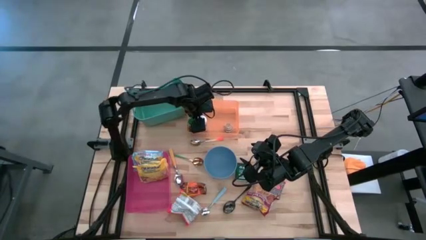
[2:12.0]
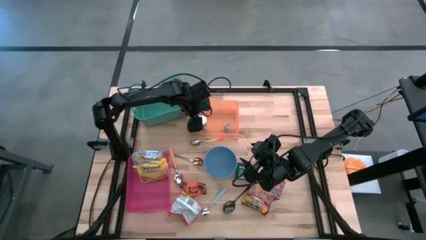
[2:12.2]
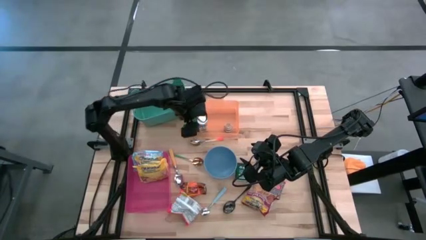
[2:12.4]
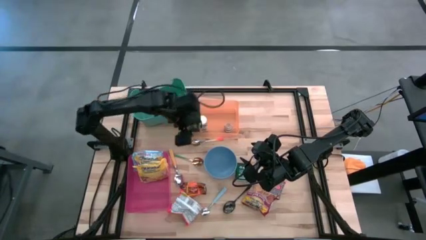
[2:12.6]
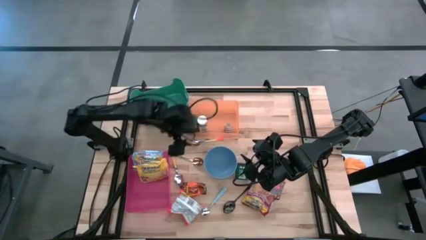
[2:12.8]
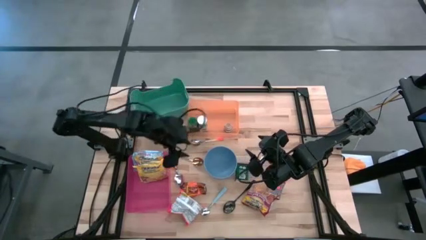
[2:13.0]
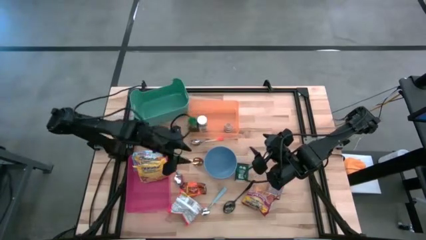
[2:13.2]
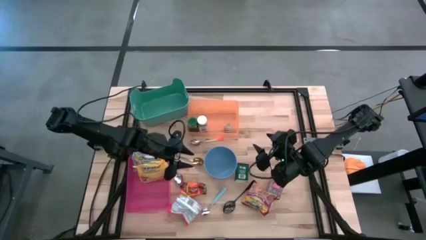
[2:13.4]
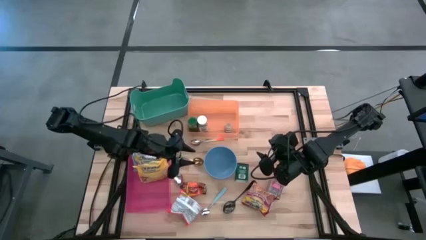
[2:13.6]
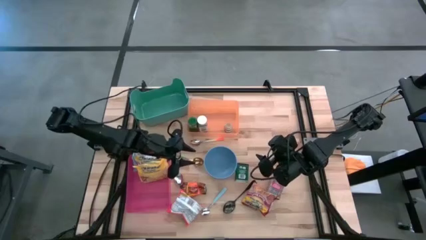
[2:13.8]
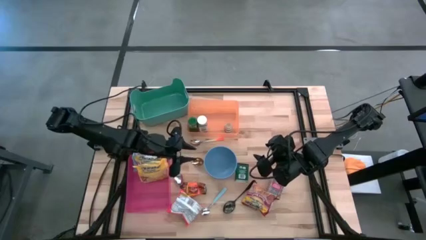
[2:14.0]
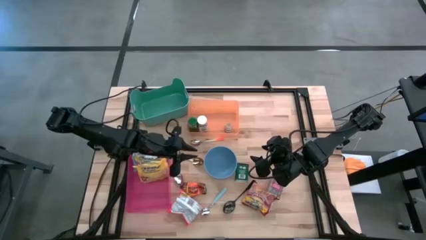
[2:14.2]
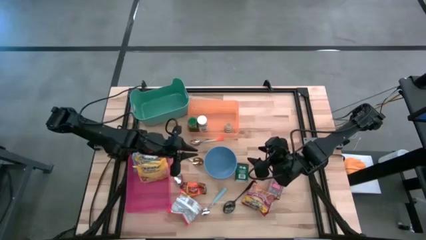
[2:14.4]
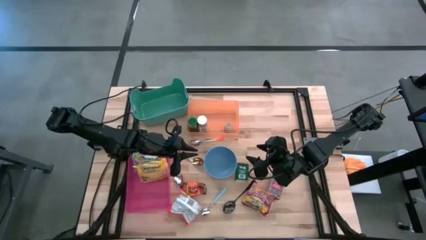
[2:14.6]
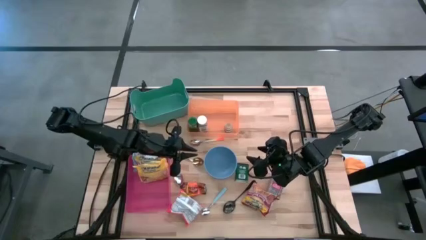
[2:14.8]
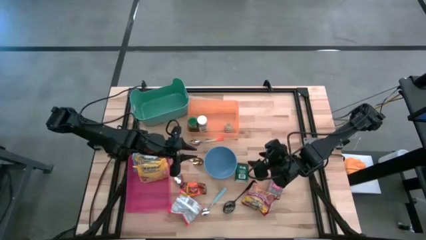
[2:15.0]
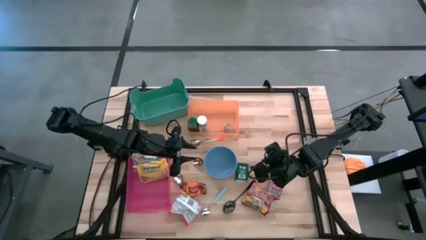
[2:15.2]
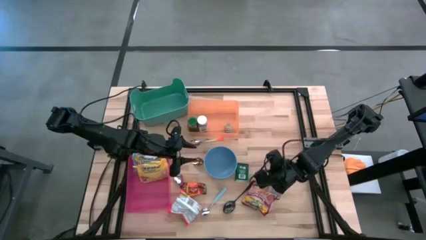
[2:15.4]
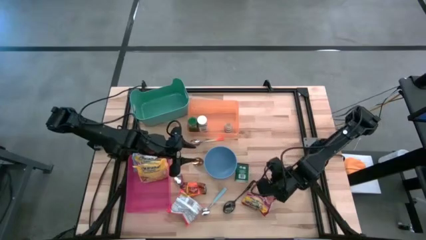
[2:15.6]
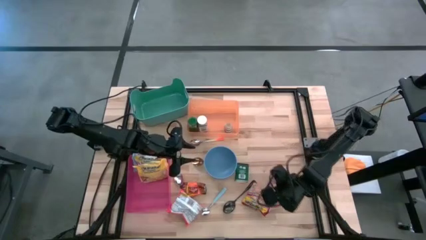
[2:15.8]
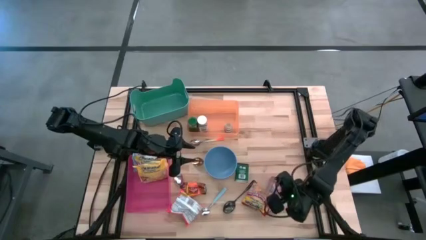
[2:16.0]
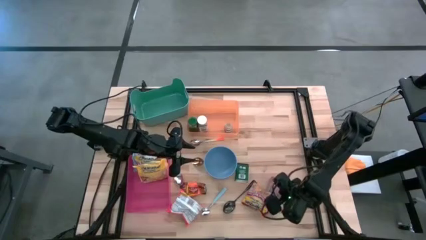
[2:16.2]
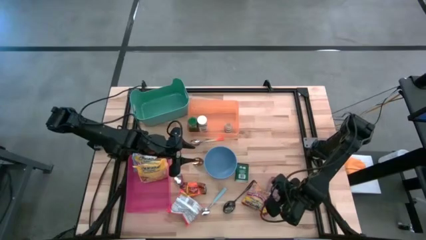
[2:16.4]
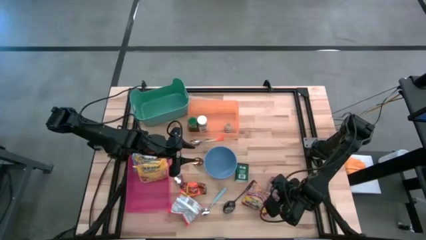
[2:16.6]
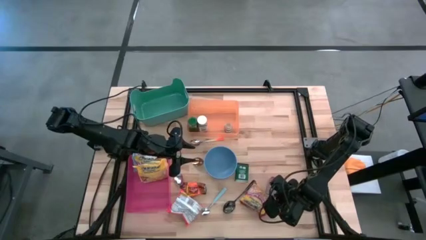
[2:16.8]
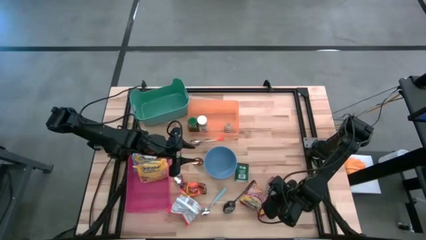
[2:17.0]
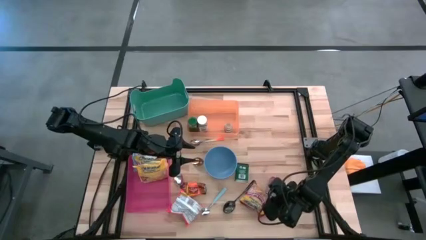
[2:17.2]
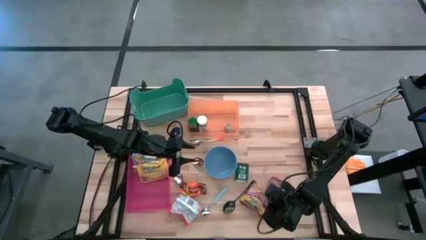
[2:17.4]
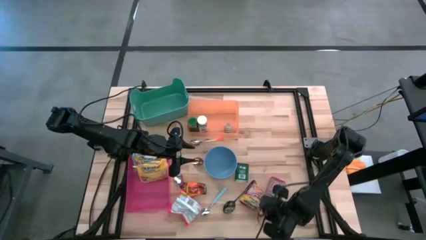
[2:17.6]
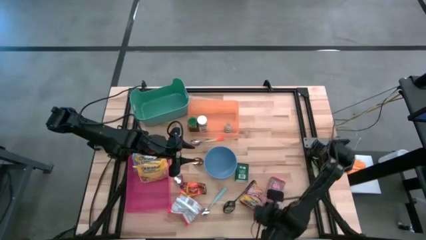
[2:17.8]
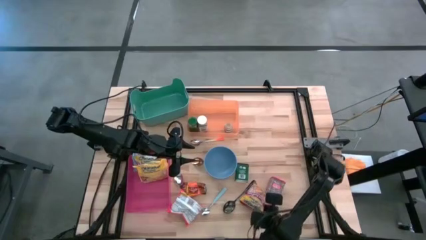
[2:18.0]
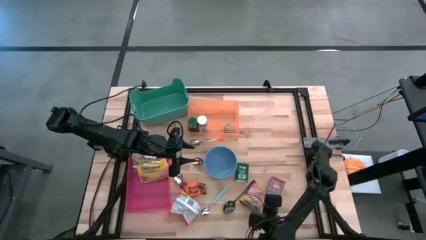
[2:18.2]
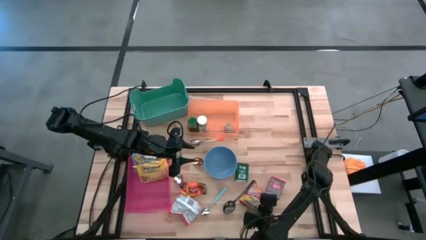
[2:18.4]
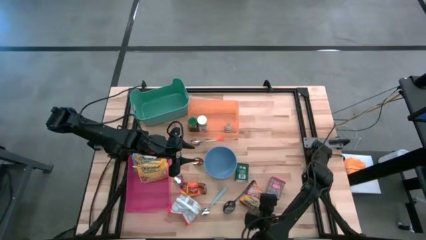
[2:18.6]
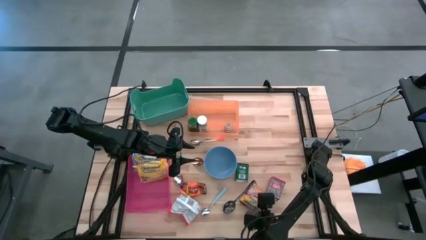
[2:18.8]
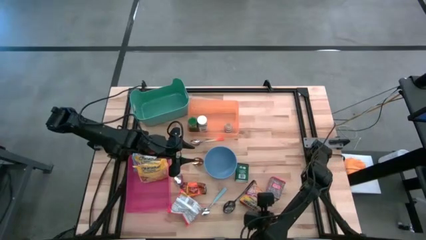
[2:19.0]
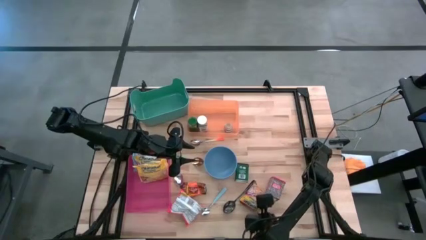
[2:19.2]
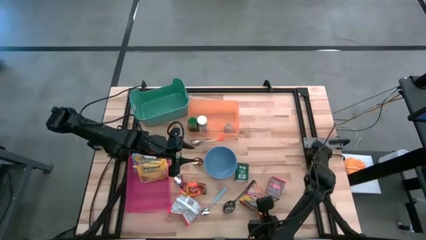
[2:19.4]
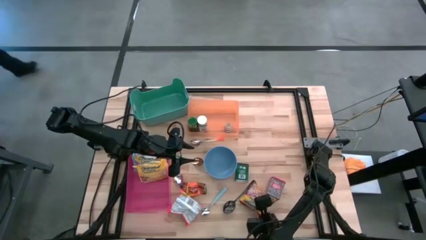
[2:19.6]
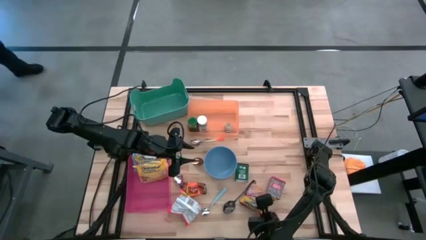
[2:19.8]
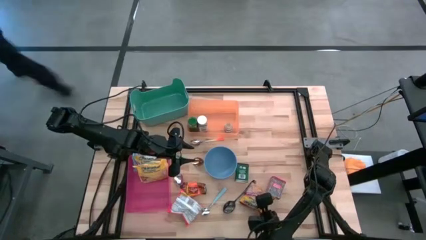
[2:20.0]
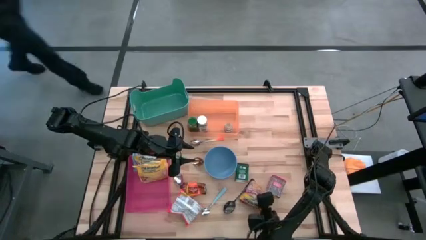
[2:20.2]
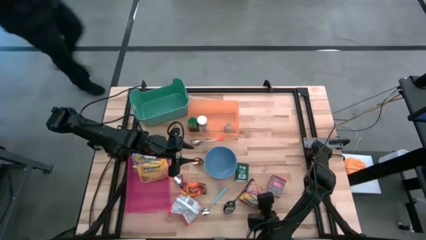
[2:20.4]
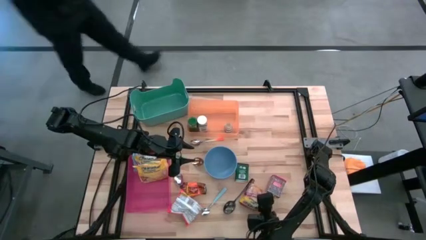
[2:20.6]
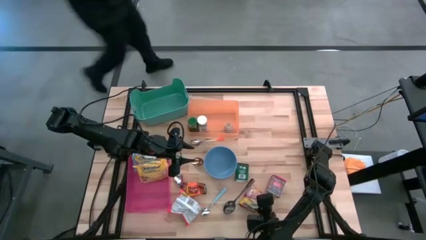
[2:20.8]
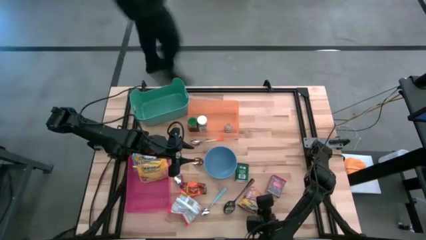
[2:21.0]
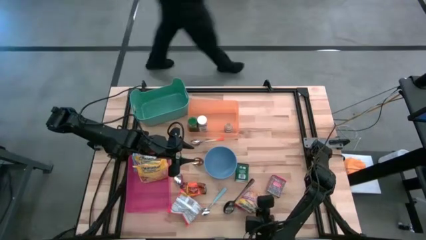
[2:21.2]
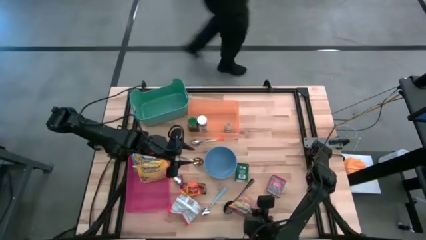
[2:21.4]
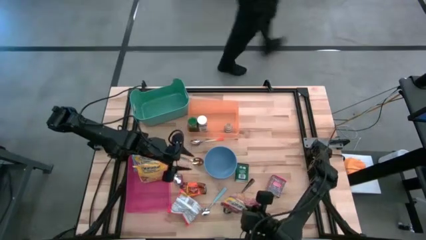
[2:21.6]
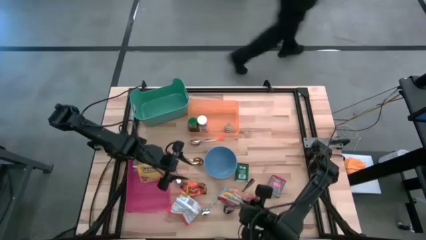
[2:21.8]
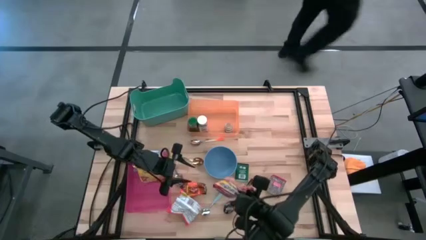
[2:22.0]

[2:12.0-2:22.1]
Put the red noodle pack into the pink bin
